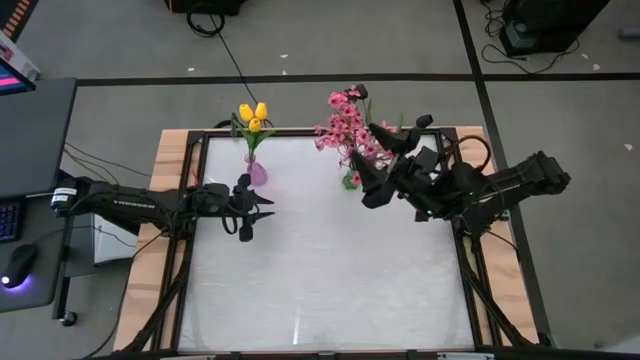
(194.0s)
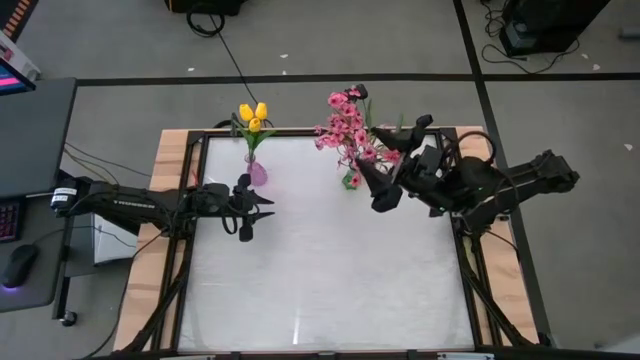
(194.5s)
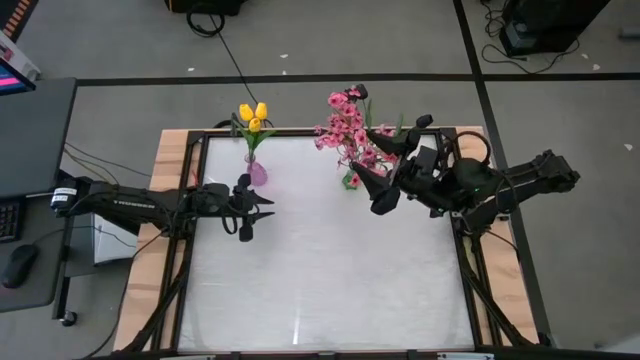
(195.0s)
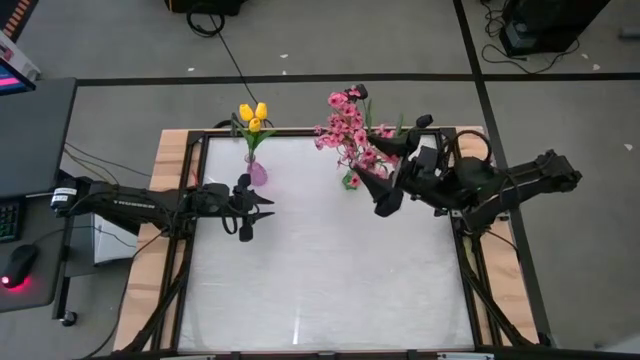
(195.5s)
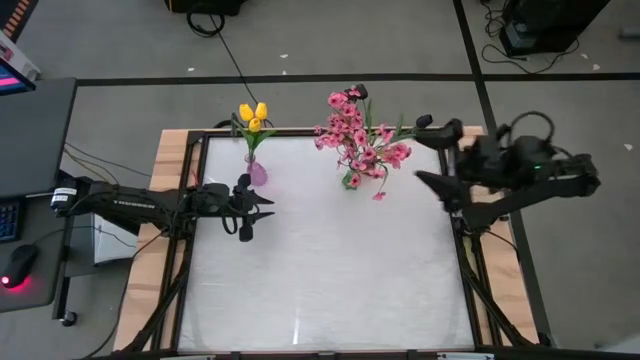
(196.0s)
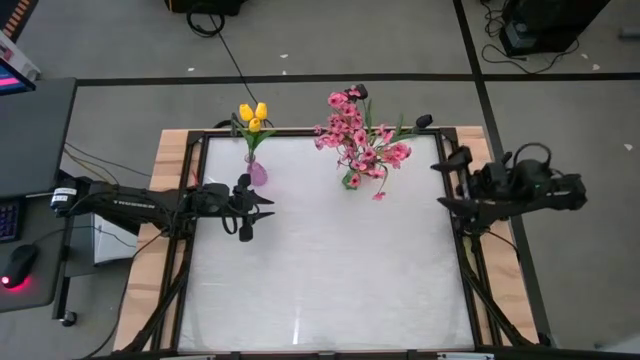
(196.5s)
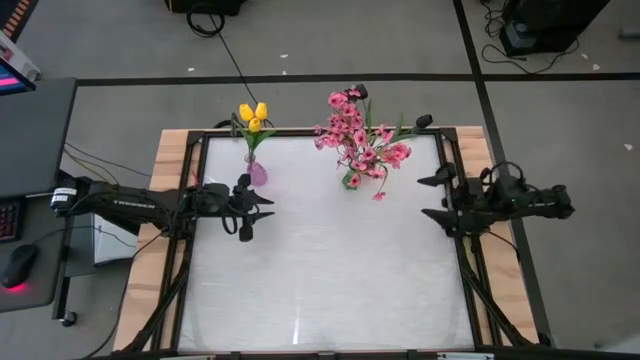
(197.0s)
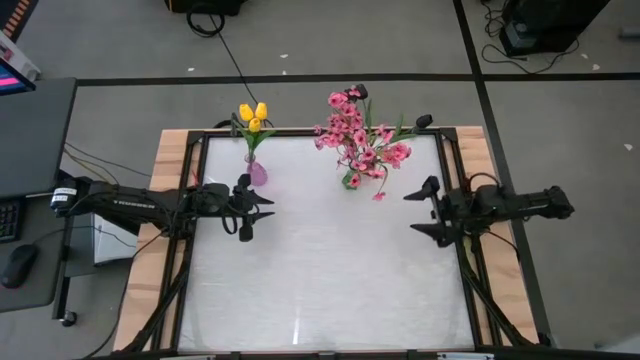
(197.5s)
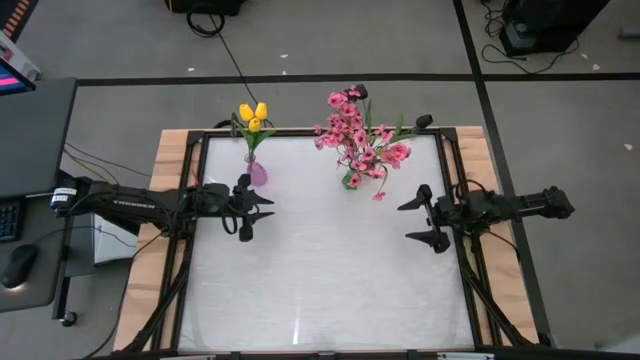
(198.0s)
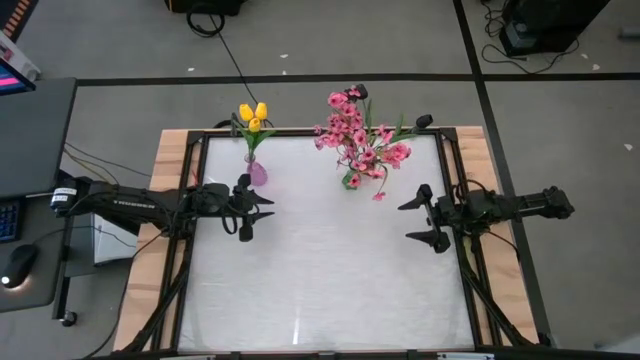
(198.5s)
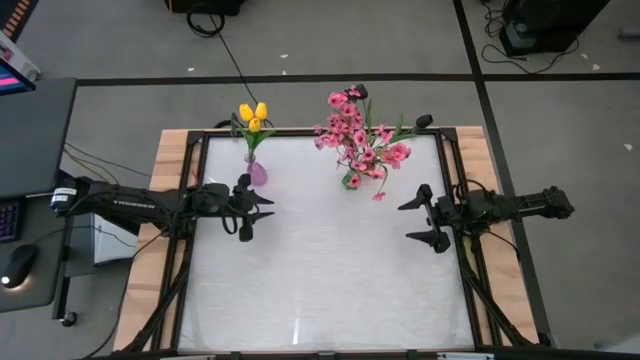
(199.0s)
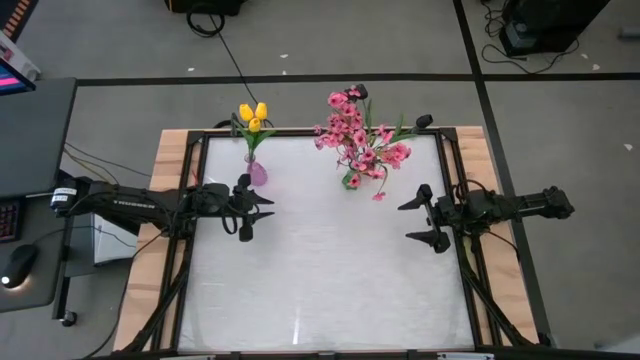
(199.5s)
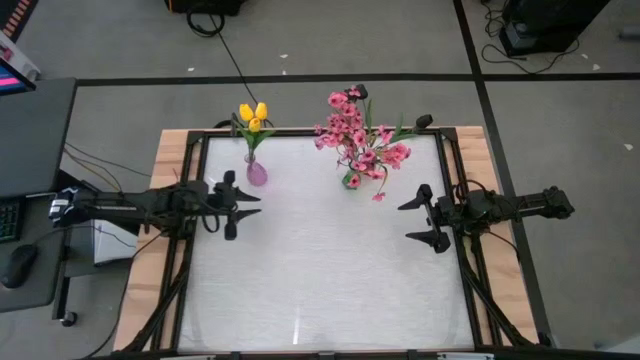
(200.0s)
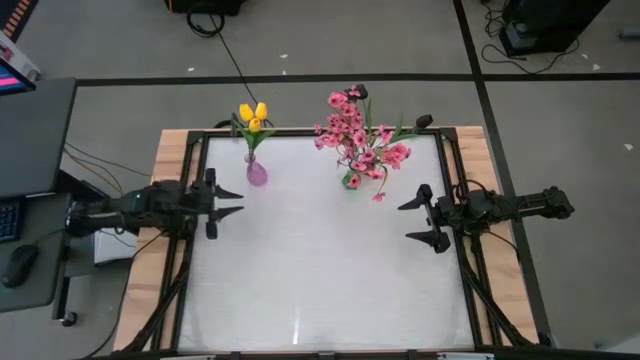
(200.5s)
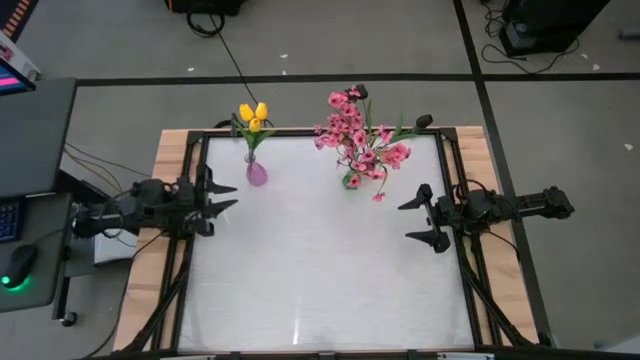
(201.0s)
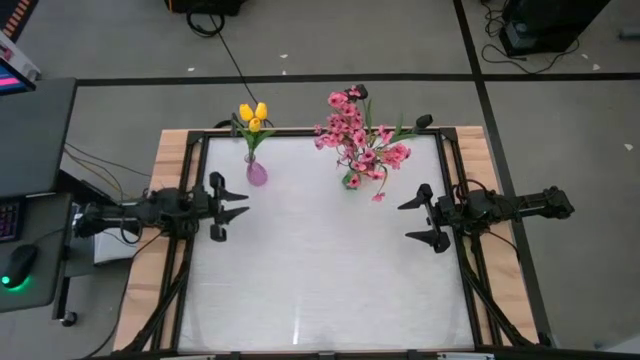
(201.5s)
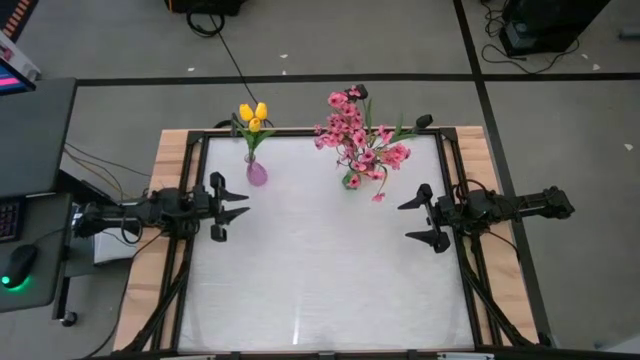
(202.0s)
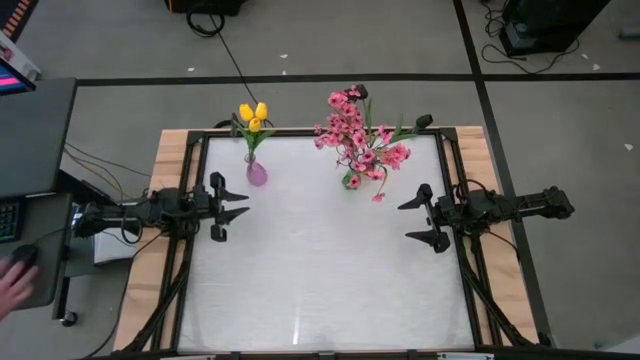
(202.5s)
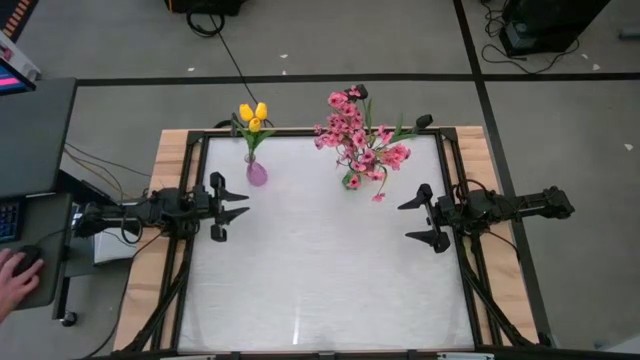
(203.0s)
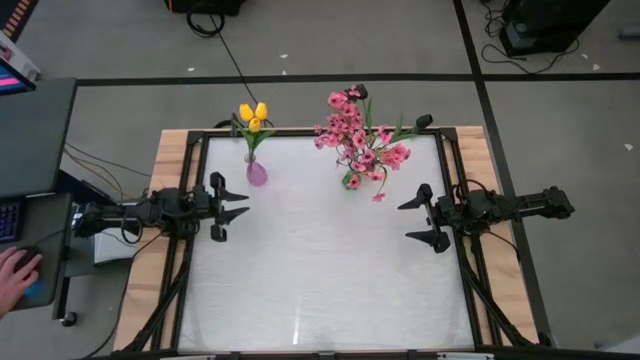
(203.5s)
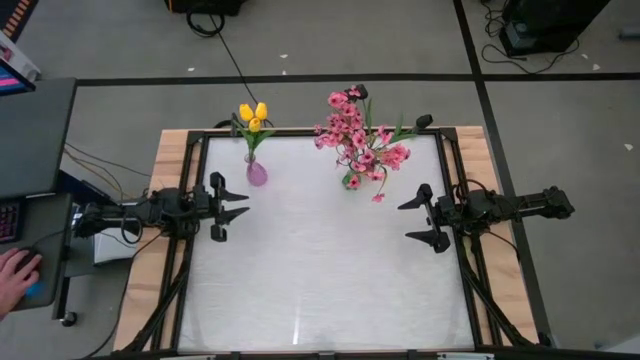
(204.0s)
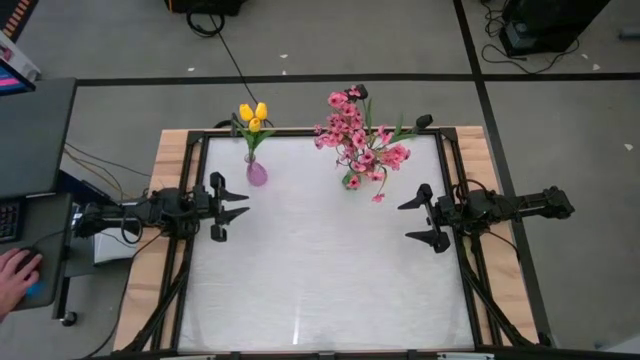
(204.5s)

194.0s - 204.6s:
Task: Sort flowers into vase by color
Return to Home Position

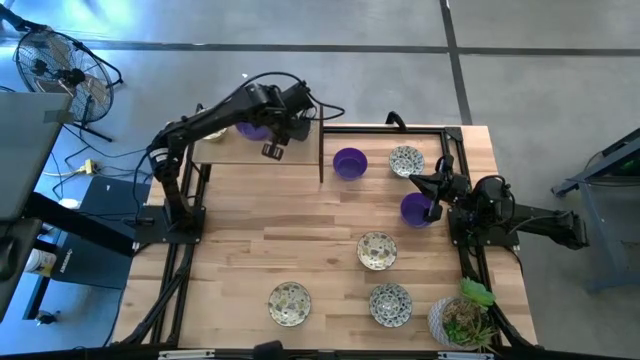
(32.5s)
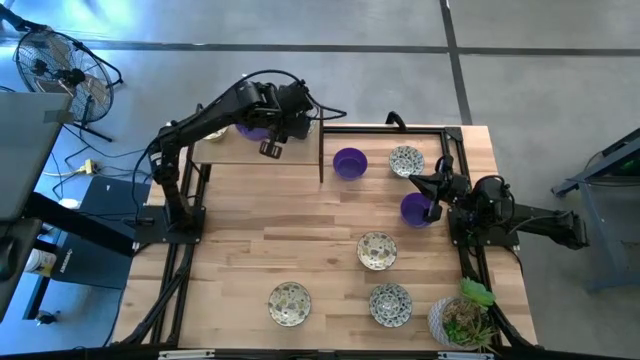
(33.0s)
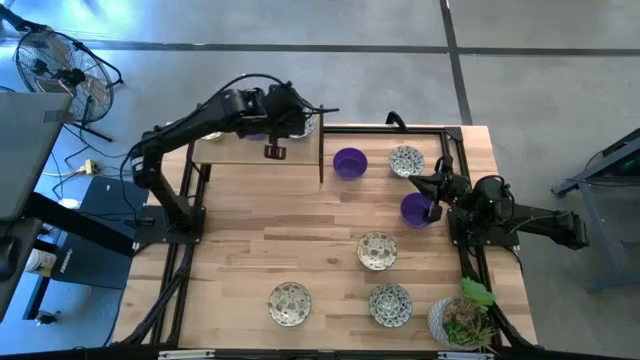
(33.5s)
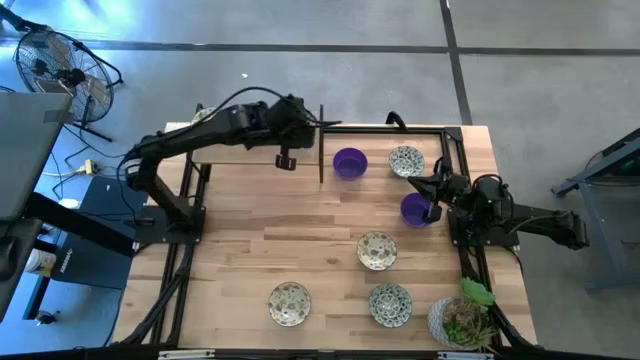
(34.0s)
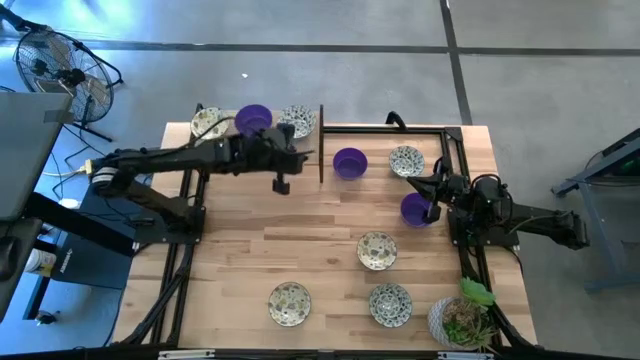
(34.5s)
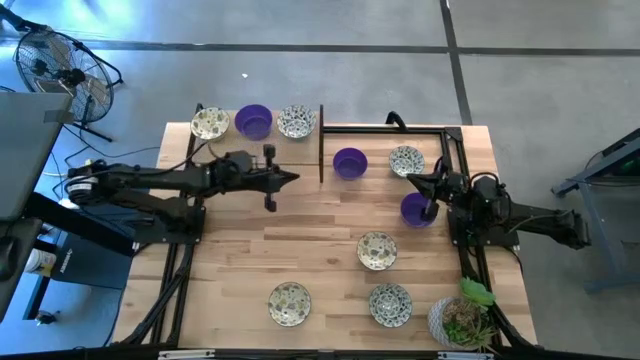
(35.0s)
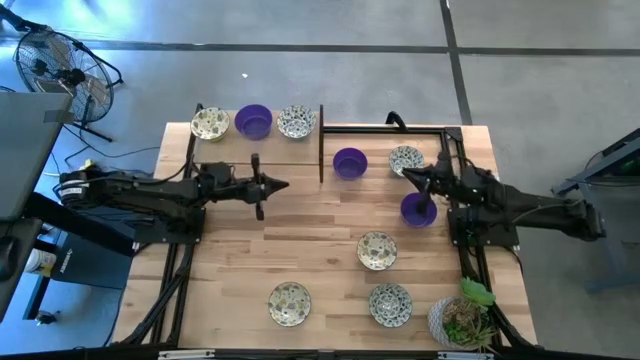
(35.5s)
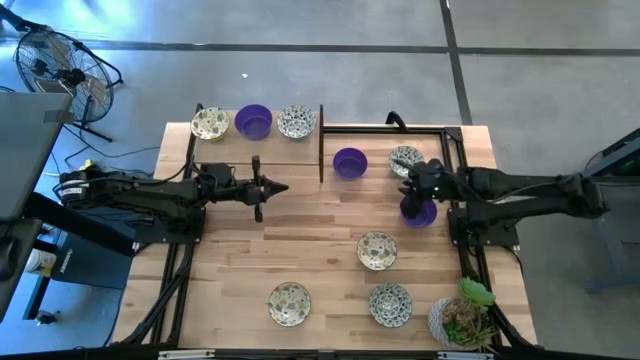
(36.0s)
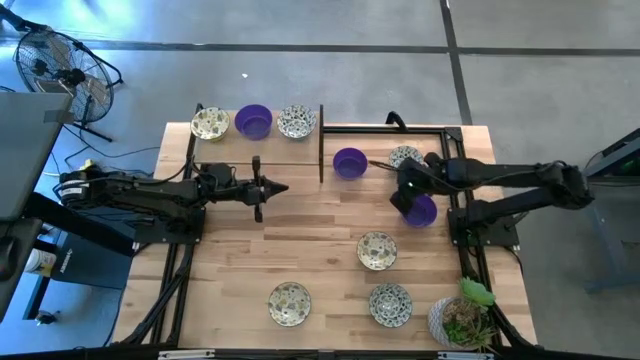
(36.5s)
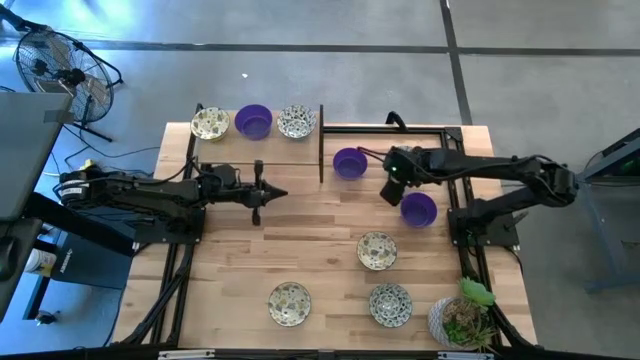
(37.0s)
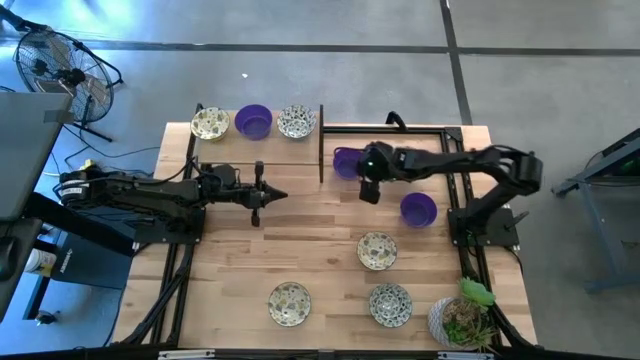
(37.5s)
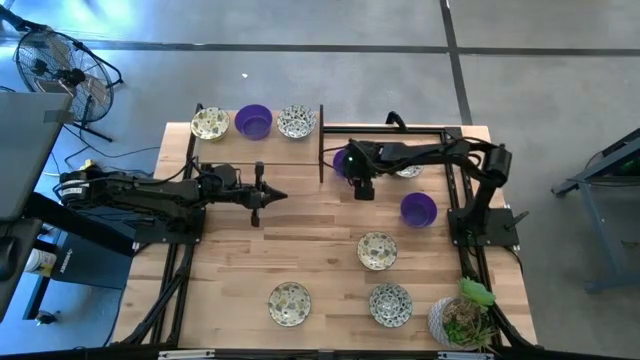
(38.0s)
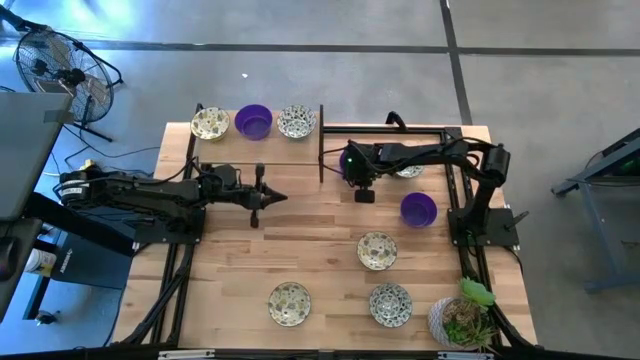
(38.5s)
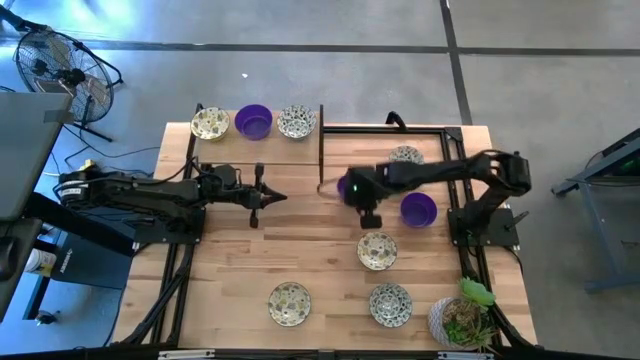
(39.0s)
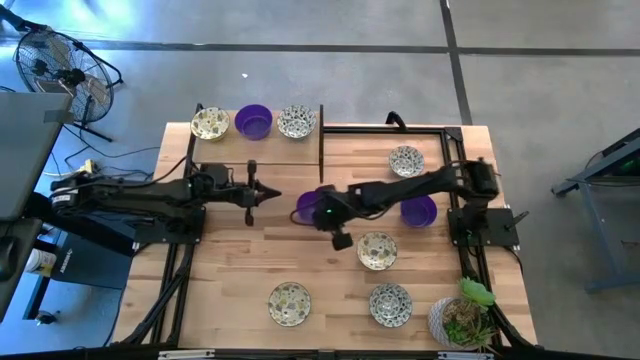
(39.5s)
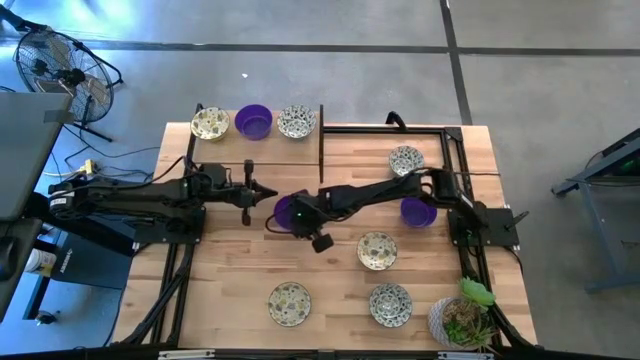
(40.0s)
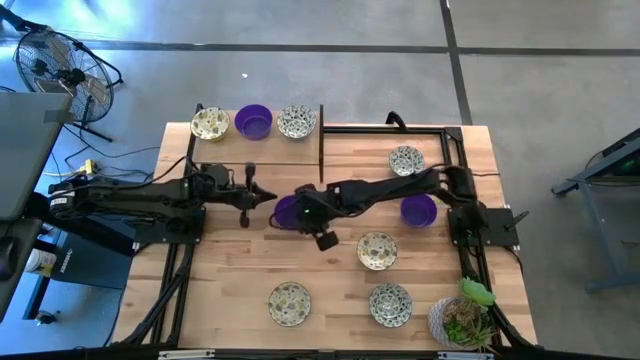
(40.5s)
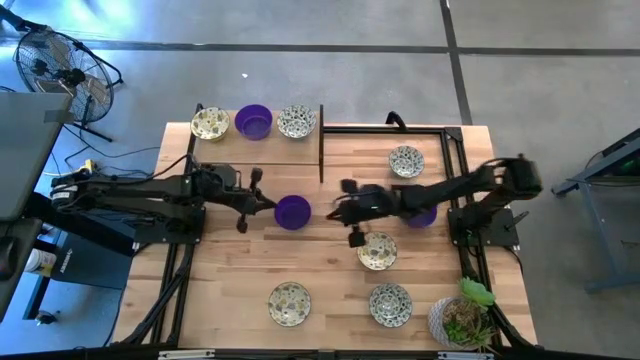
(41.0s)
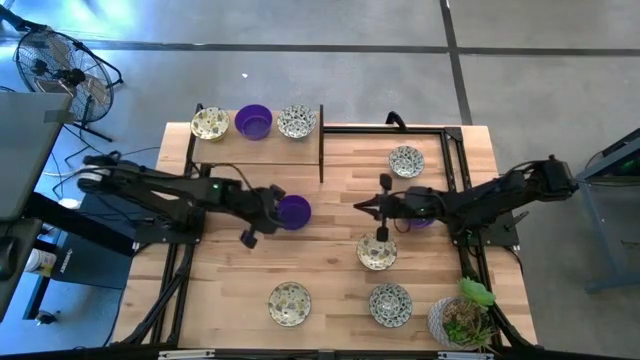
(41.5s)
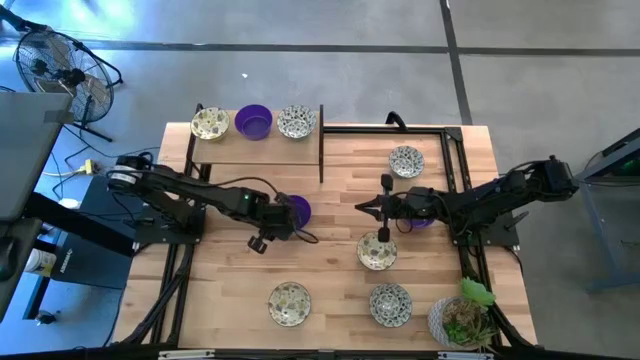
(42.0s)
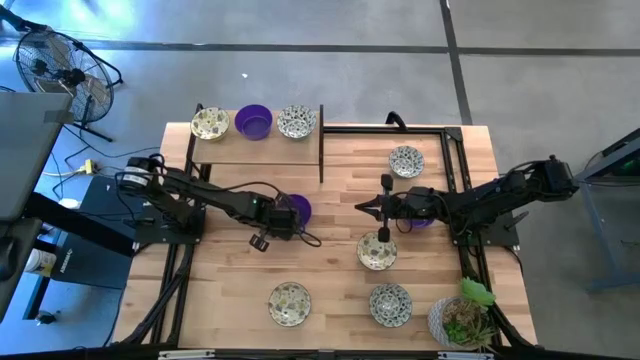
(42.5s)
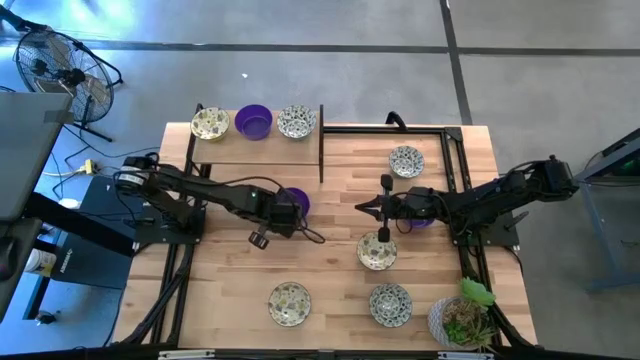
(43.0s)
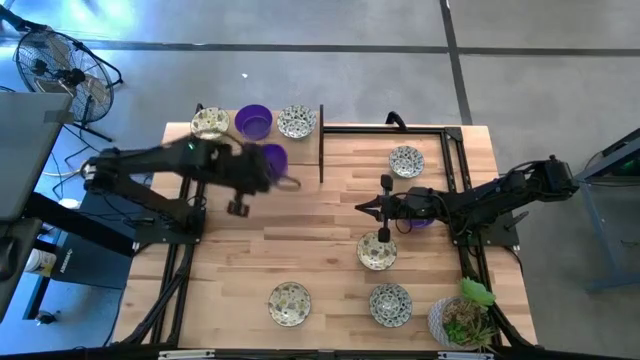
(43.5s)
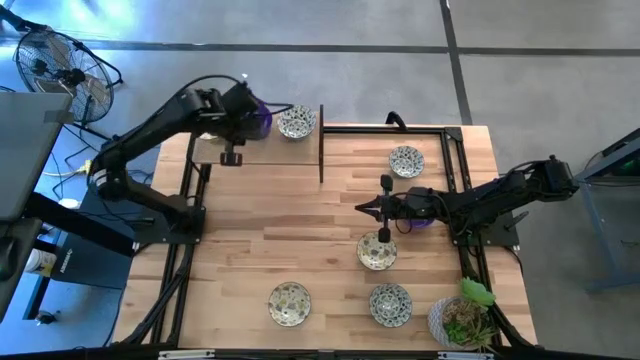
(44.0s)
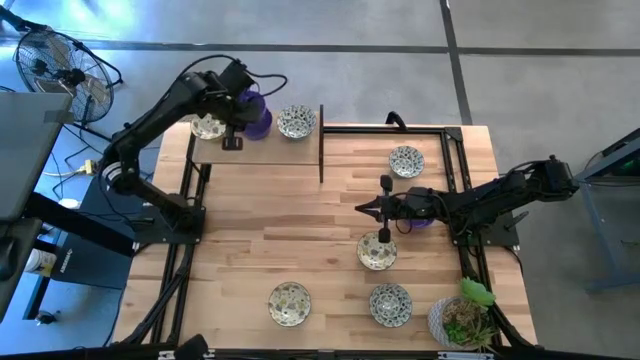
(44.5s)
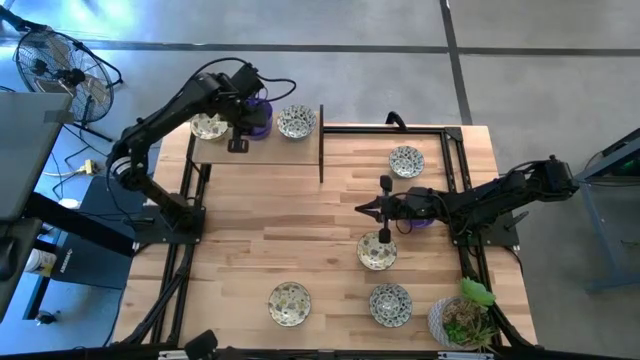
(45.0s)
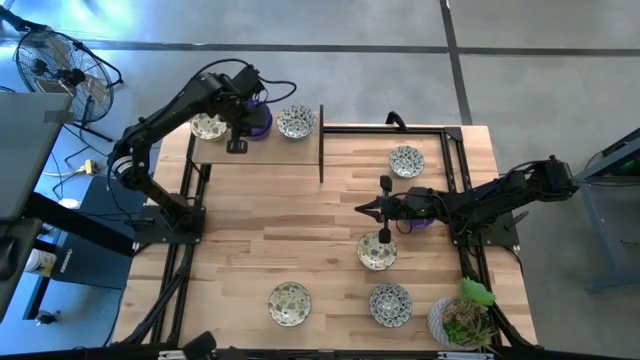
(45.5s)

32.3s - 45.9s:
Task: Pick & Place Mini bowls
Stack the top blue bowl on the blue bowl on the shelf
